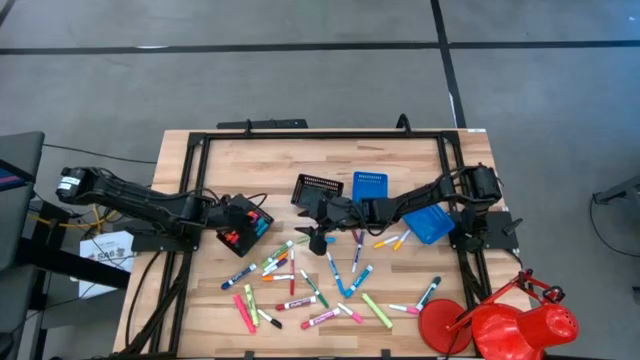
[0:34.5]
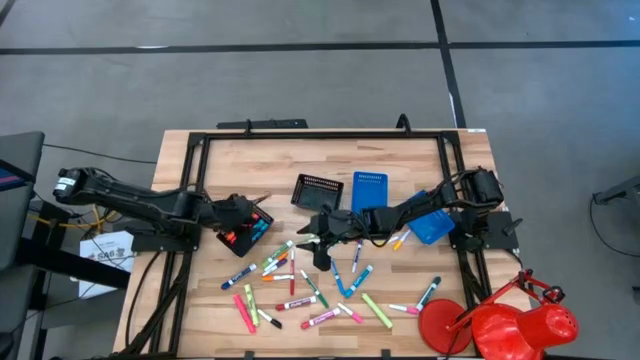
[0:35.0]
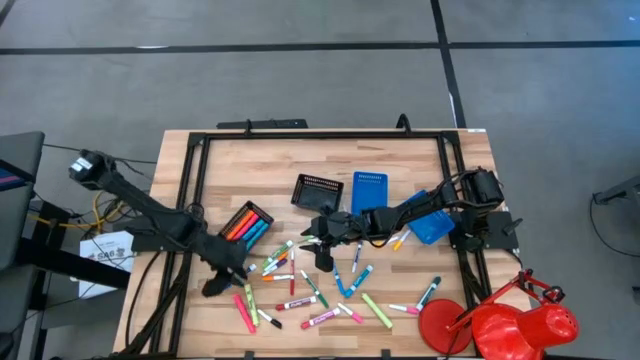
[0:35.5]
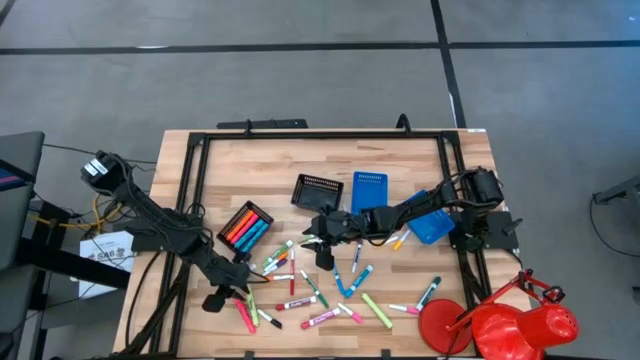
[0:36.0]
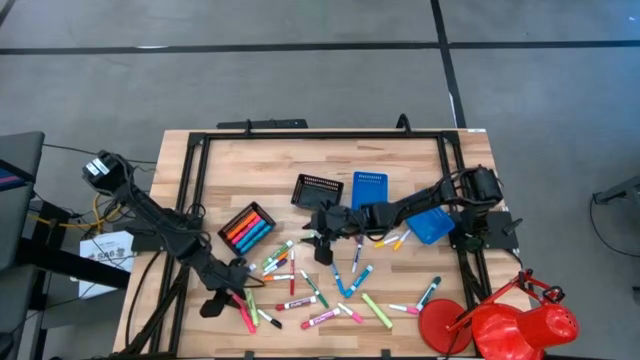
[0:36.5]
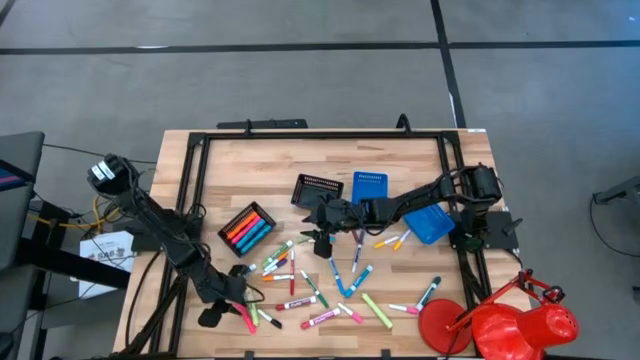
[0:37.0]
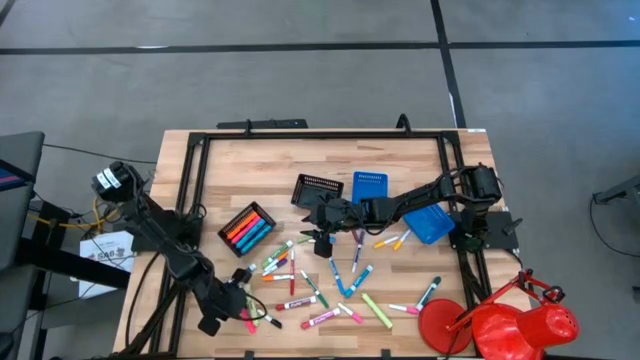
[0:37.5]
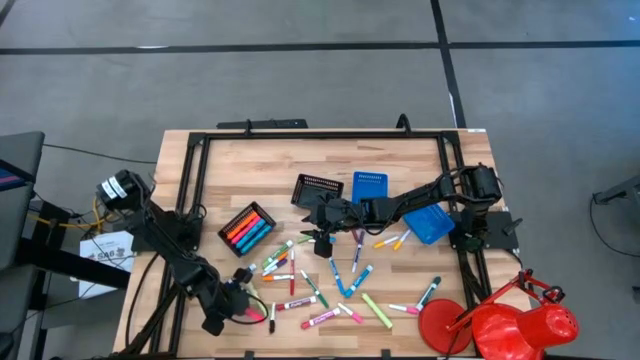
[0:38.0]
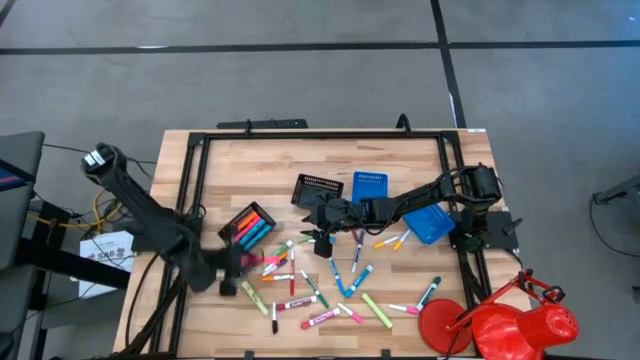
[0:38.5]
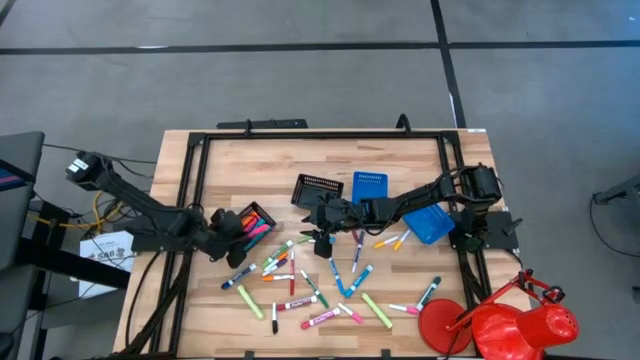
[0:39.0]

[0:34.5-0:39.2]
Task: Pick & Place Markers
Put the pink highlighter into the left black bin

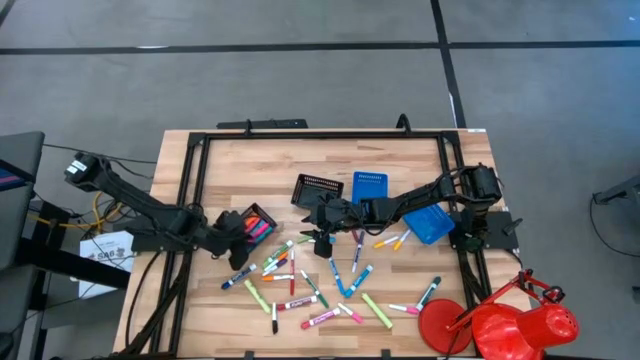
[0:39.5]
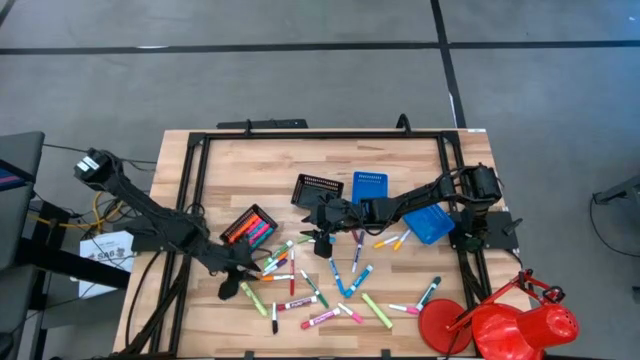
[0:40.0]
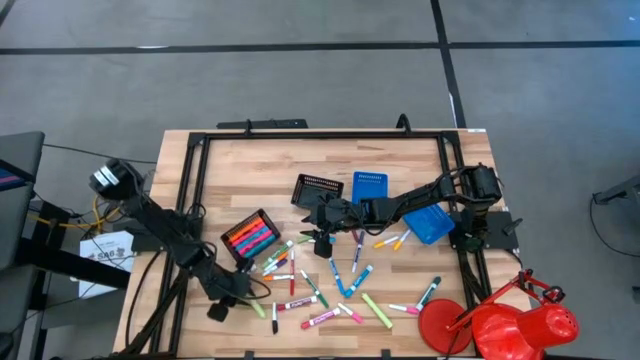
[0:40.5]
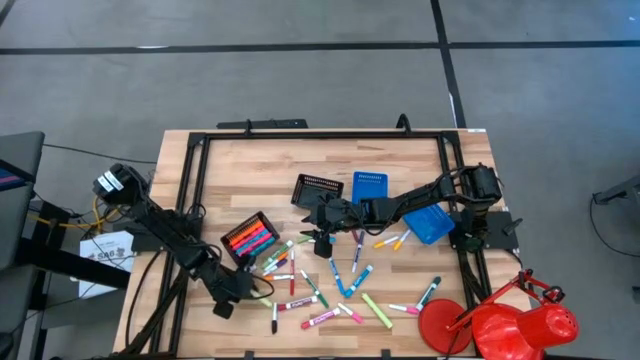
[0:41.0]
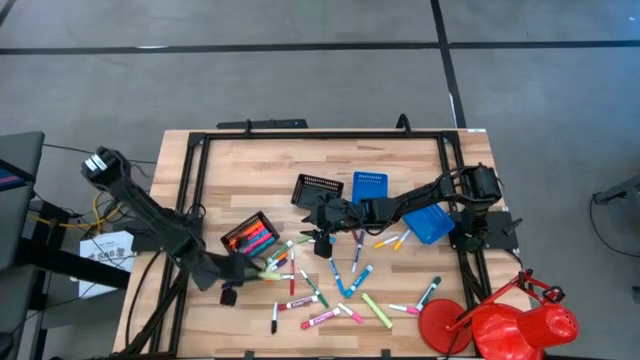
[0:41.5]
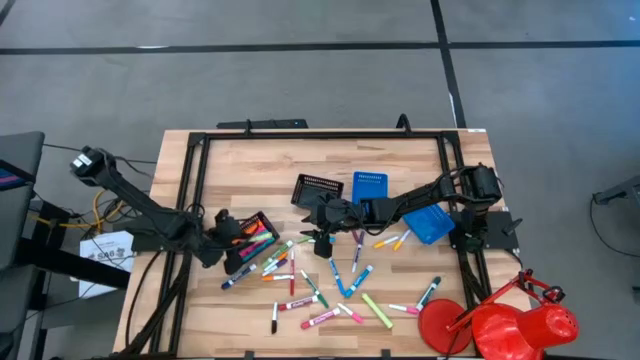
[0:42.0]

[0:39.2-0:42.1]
Put the left light green highlighter into the left black bin

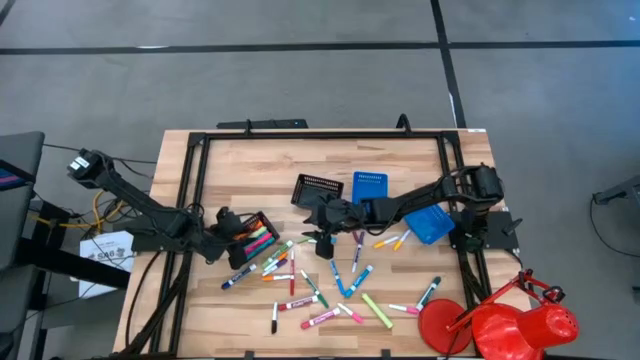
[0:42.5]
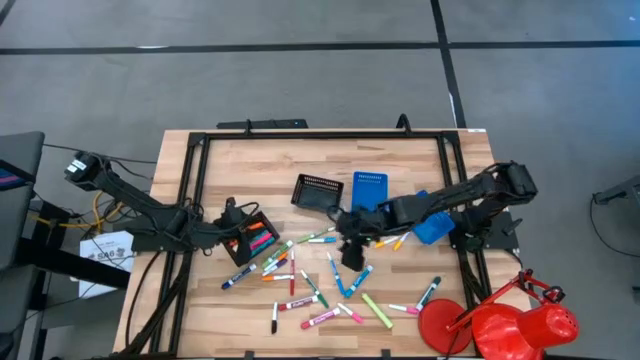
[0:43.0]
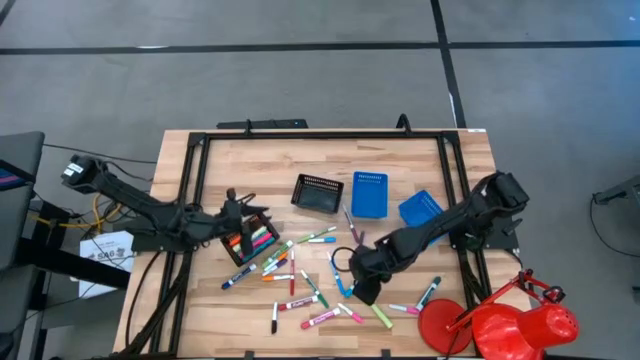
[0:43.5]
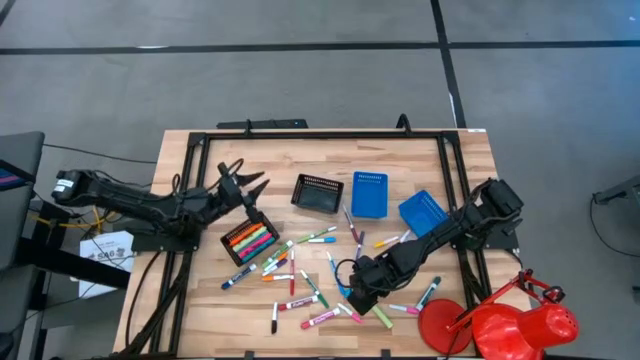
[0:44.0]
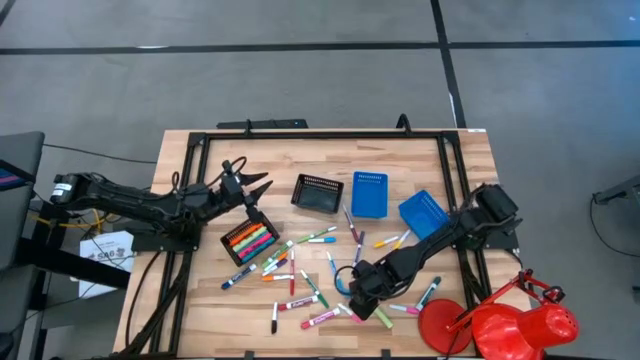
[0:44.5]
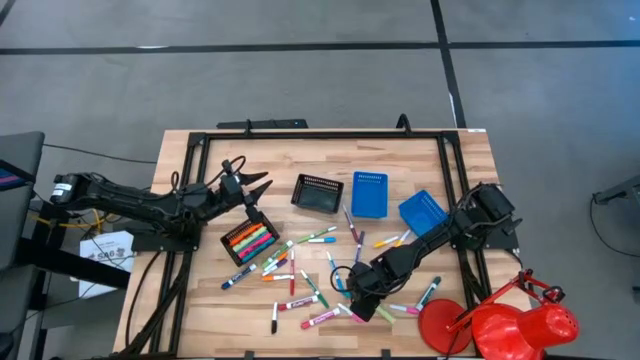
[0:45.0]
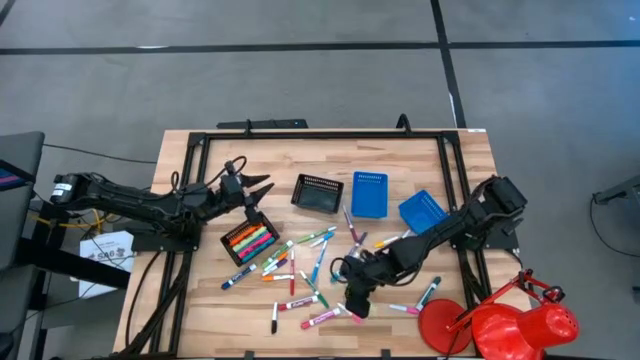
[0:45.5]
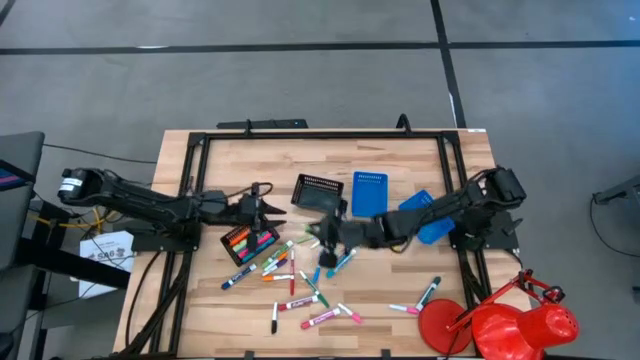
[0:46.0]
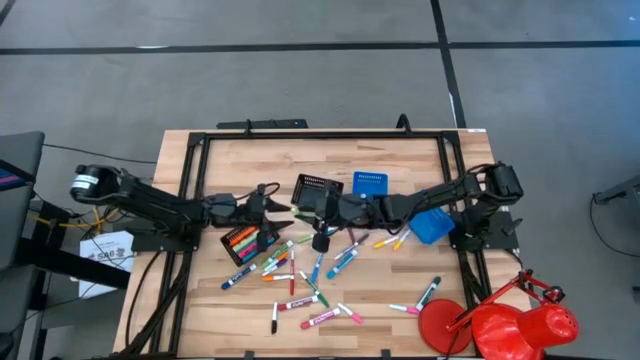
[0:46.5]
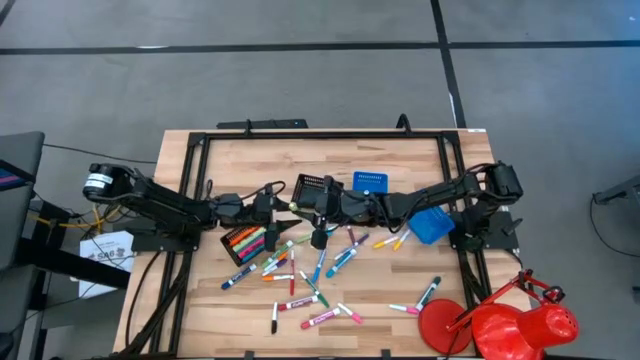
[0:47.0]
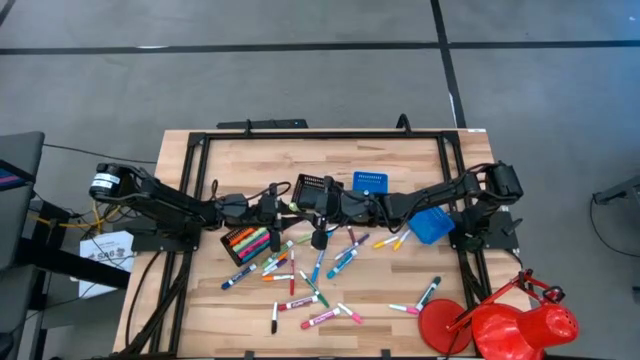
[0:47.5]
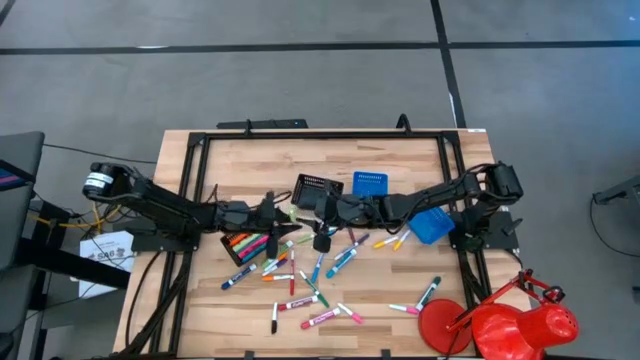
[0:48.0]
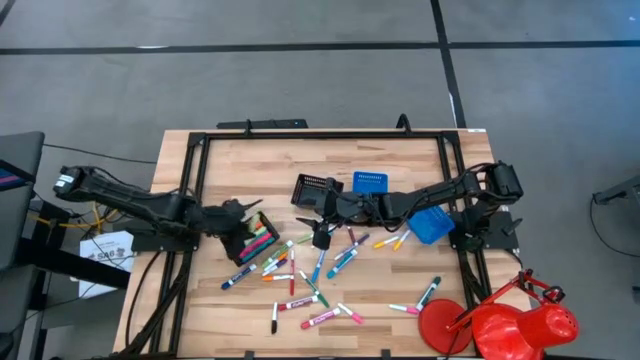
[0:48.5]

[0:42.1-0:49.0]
Put the light green highlighter into the left black shelf

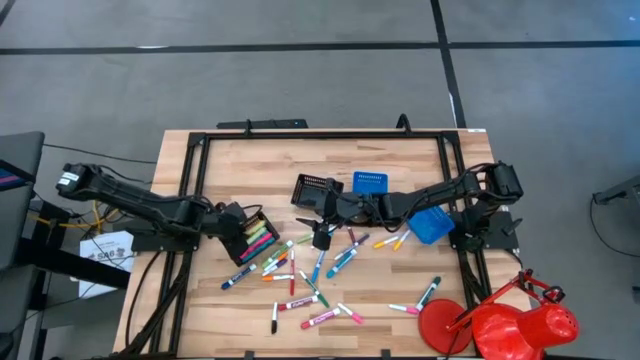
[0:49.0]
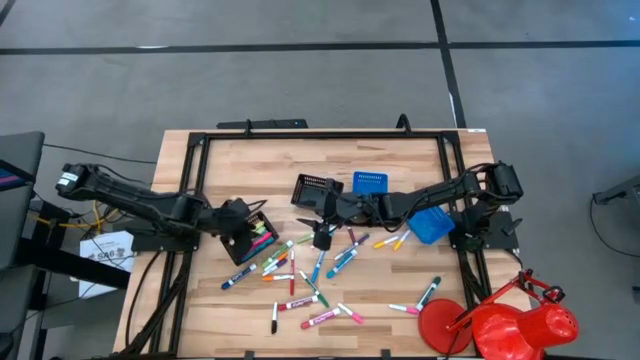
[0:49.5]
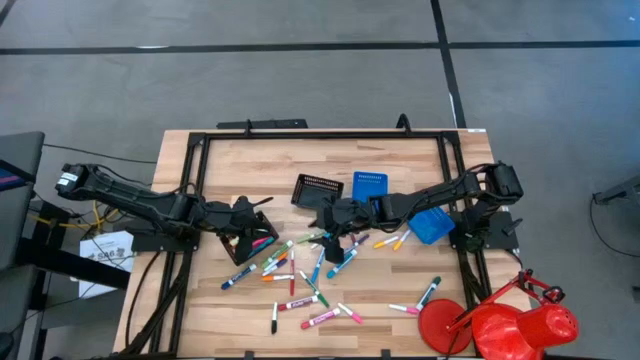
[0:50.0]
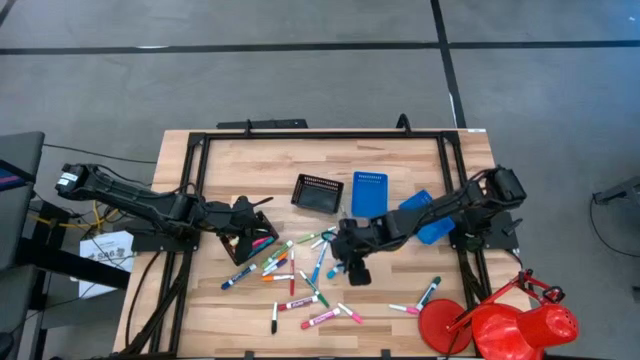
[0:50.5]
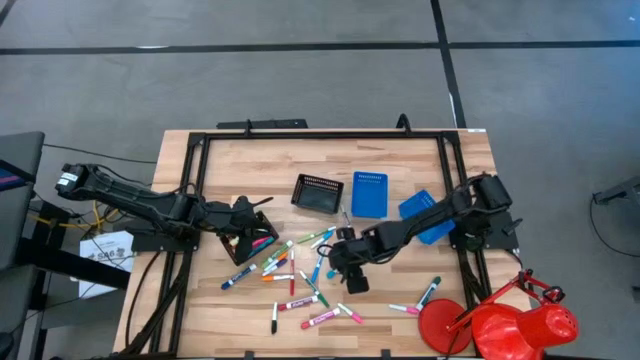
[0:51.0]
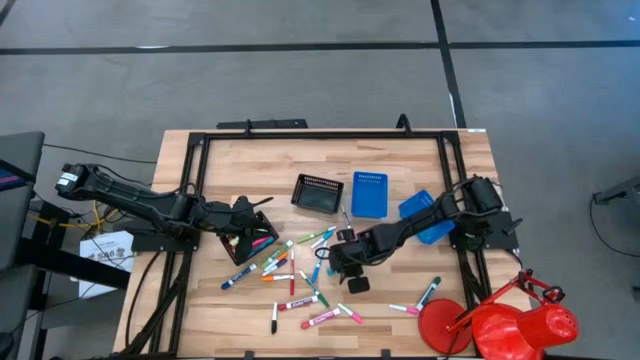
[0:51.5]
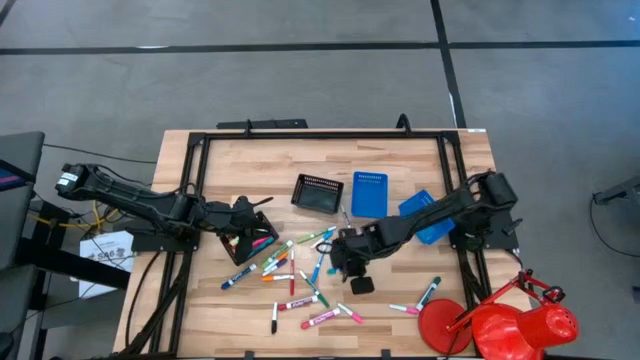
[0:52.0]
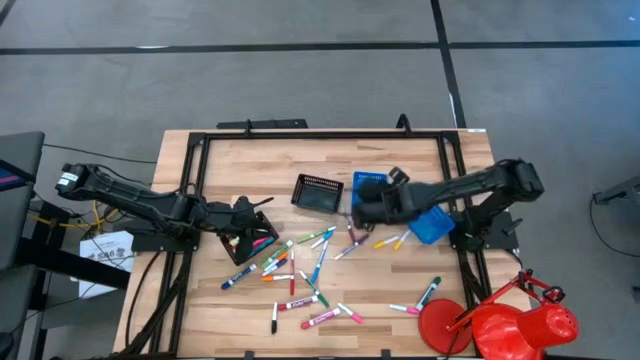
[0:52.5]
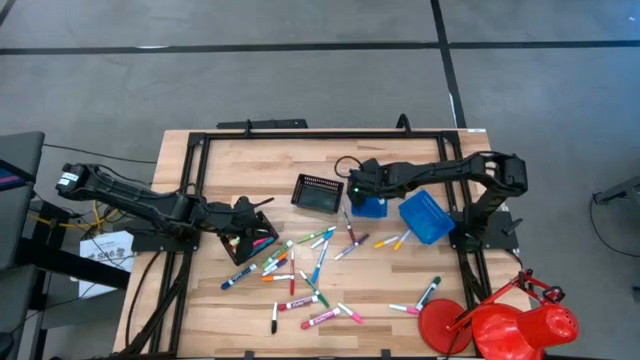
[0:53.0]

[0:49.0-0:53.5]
Put the large light blue marker into the left blue bin

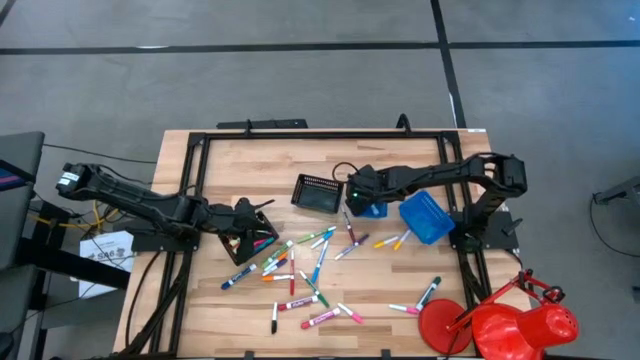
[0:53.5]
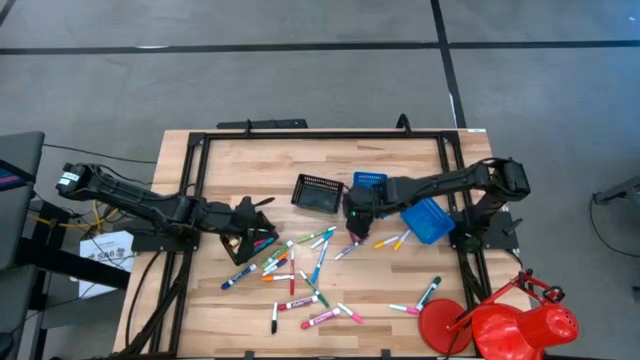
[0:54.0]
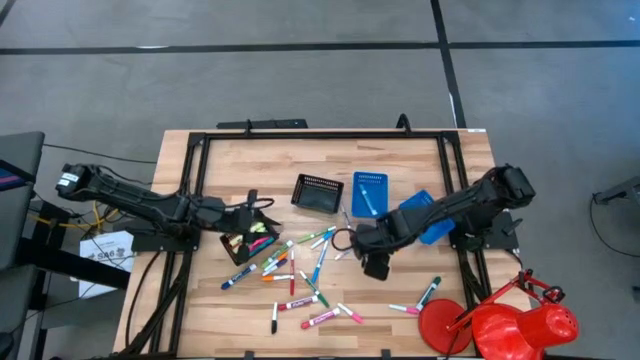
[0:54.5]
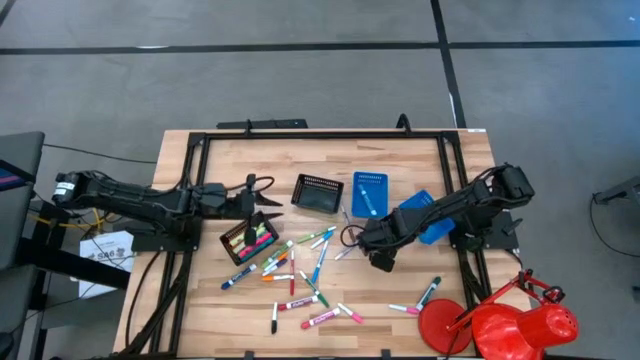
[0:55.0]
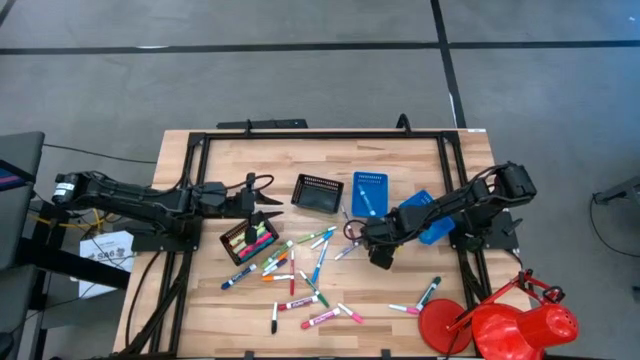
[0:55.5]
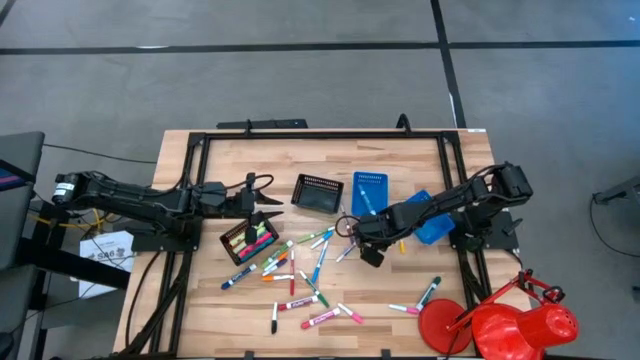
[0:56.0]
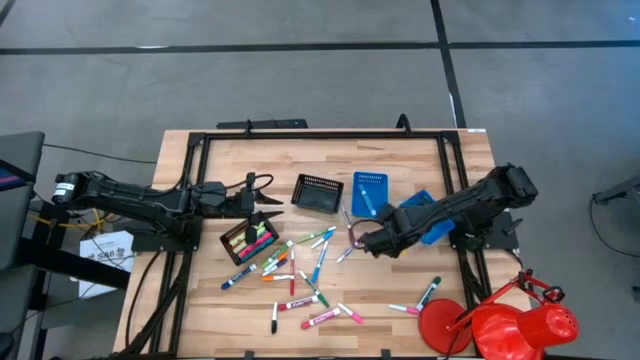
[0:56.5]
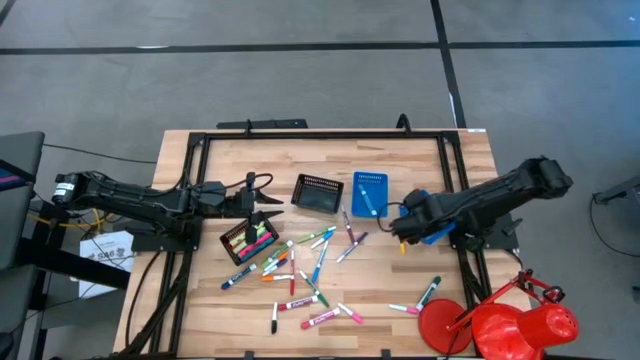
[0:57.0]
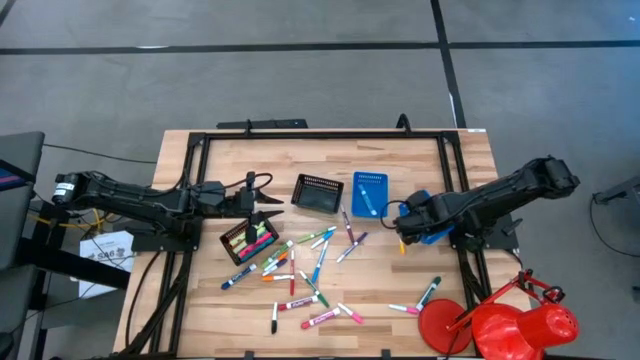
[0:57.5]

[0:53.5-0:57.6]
Put the left yellow highlighter into the right blue bin
